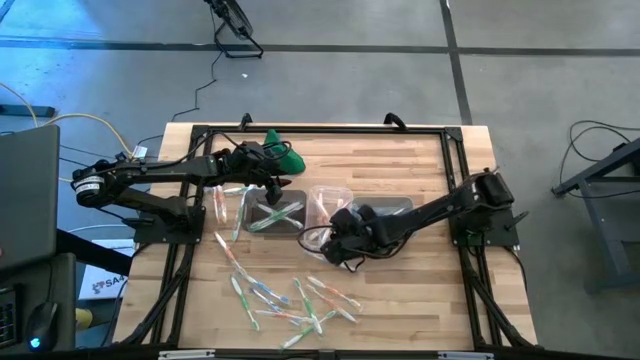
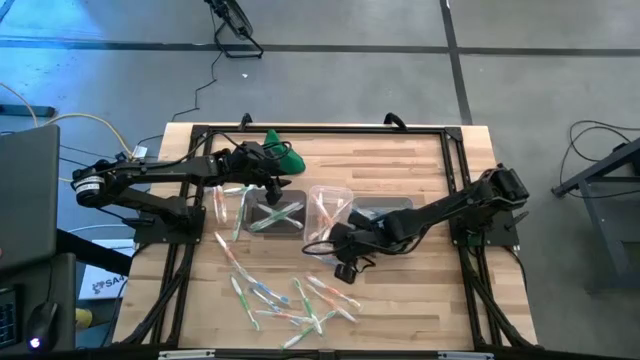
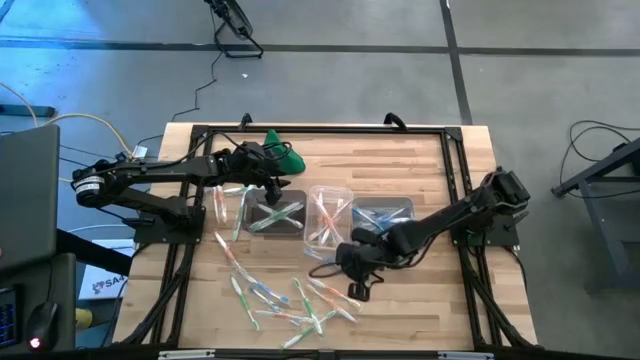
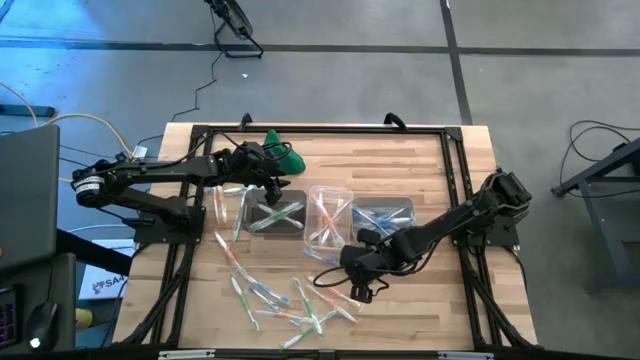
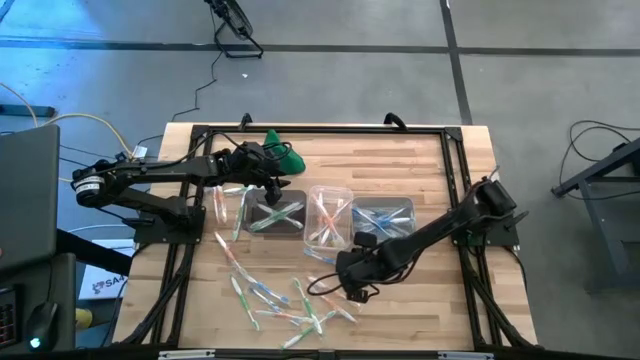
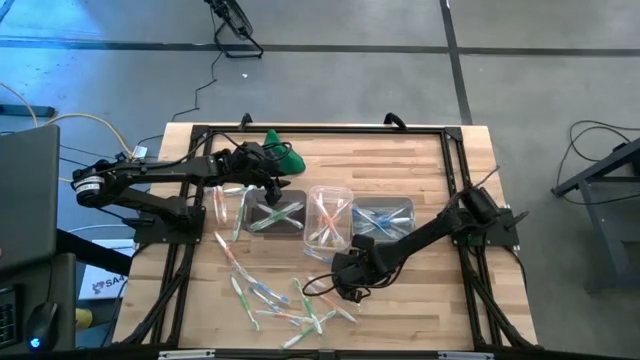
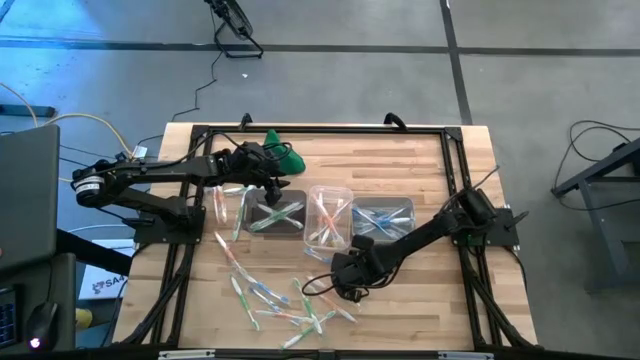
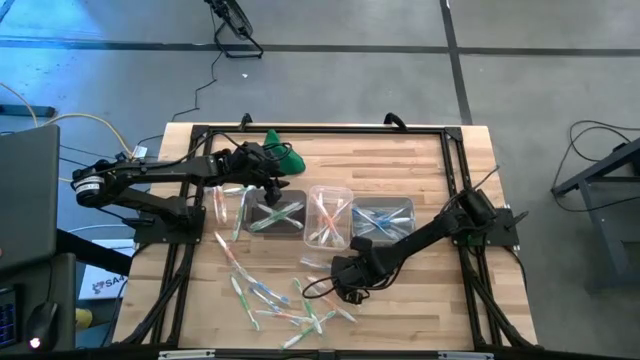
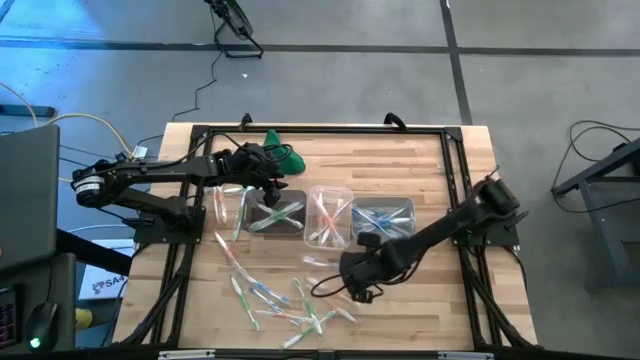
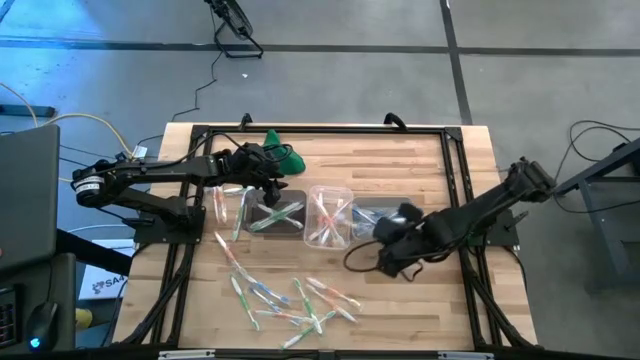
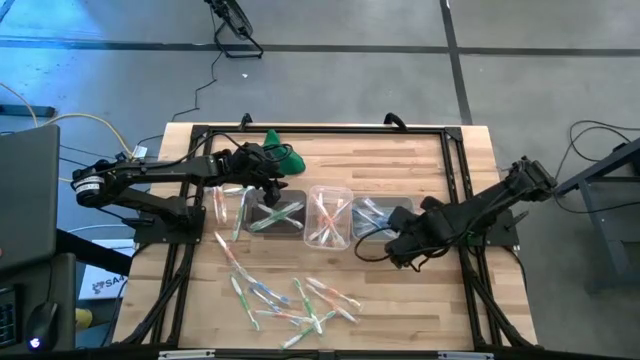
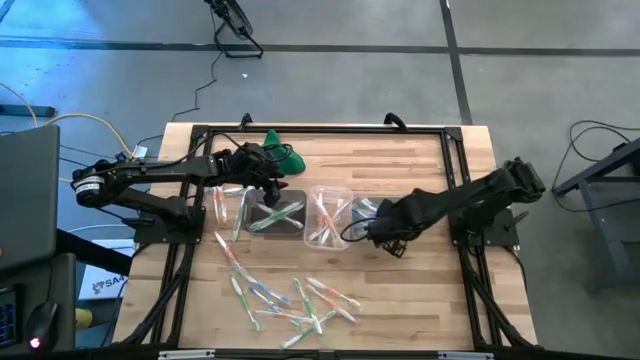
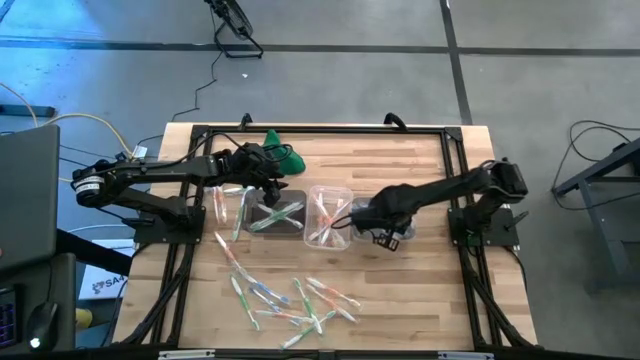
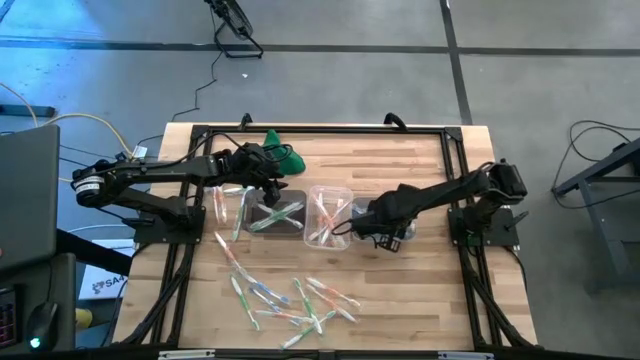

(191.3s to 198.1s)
Task: Pick & Place Toothbrushes
Put the blue toothbrush into the gray bin

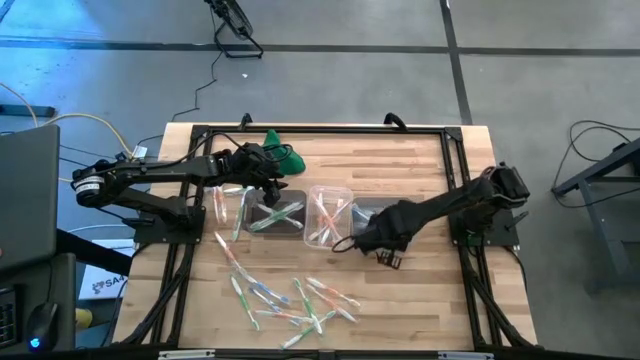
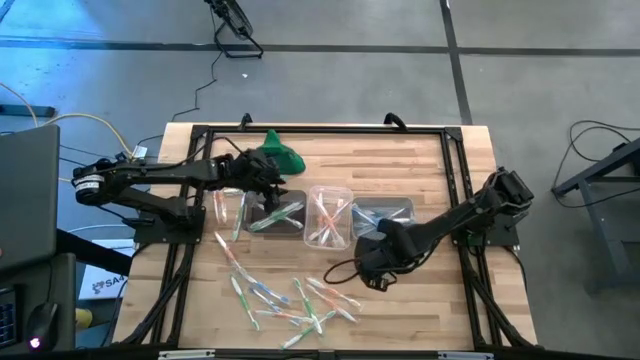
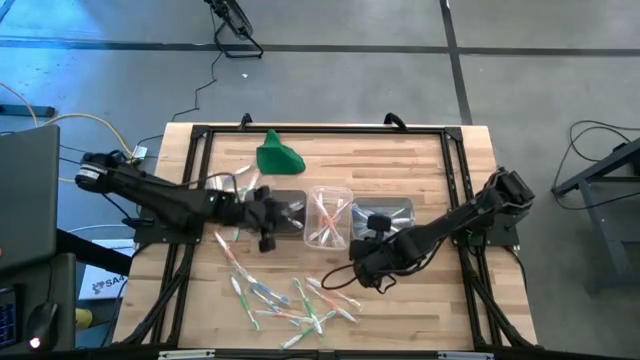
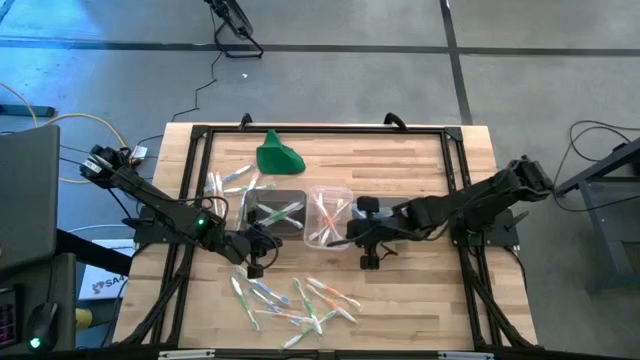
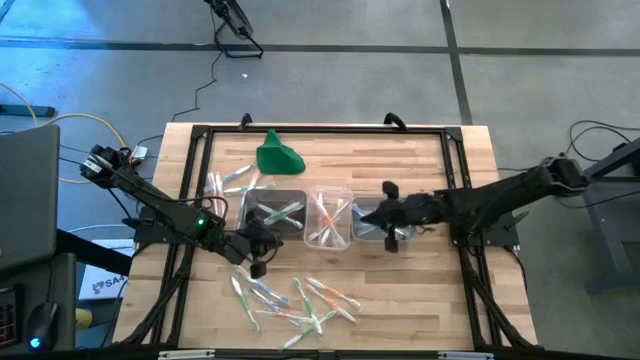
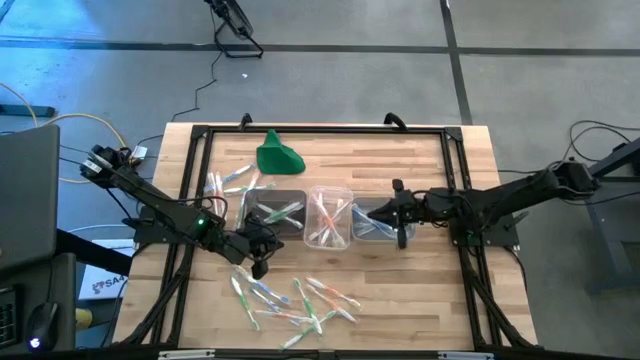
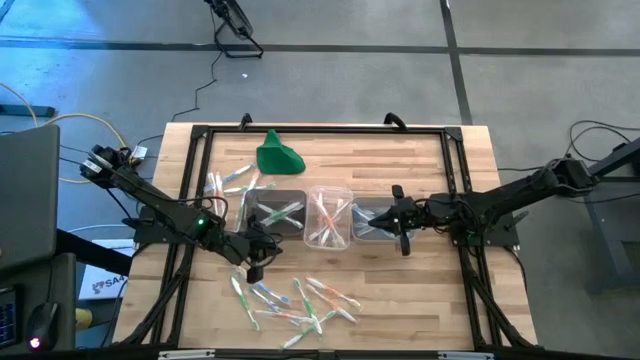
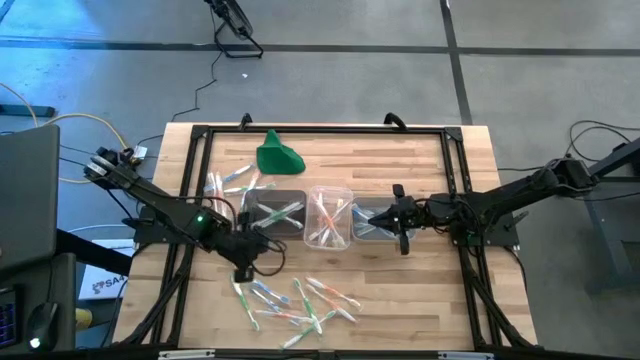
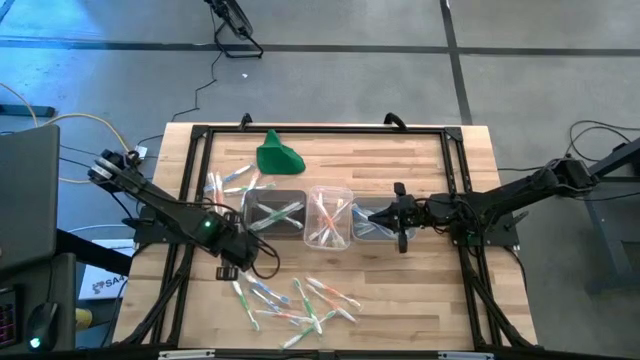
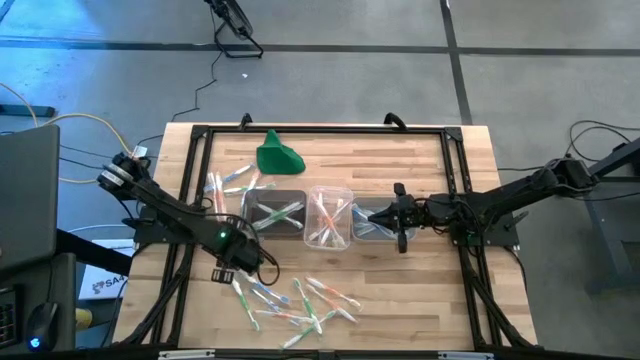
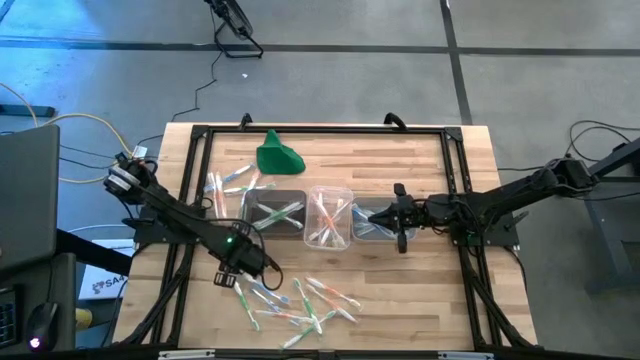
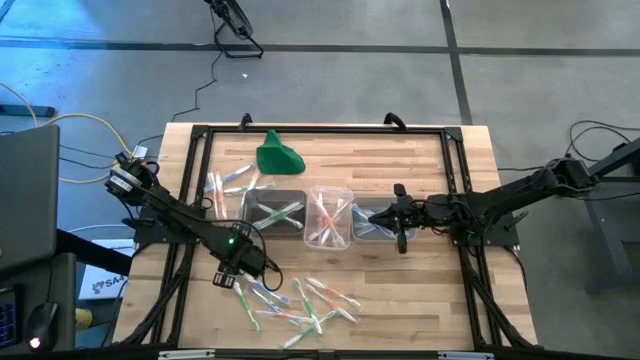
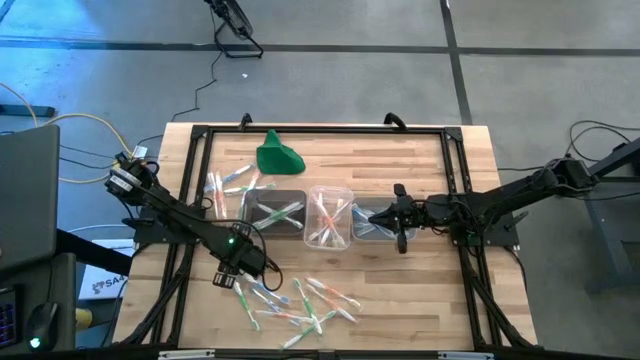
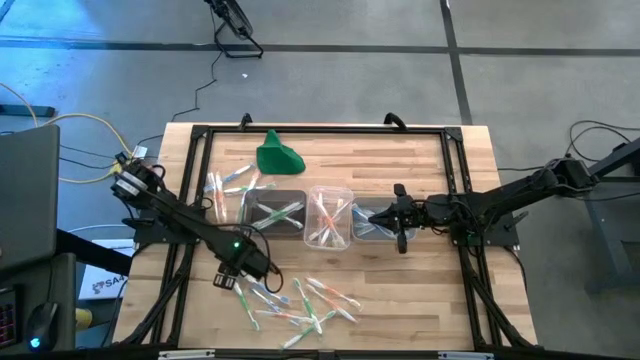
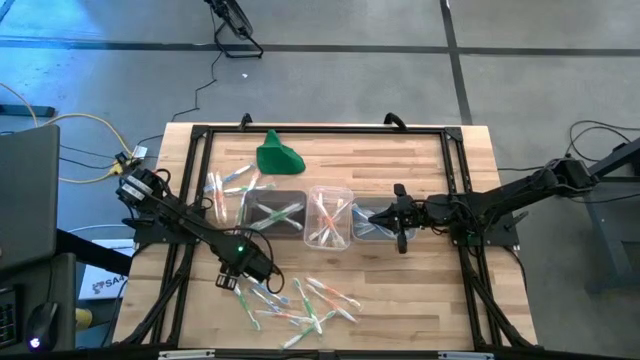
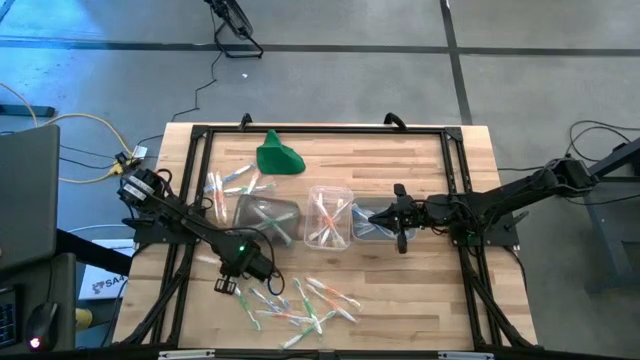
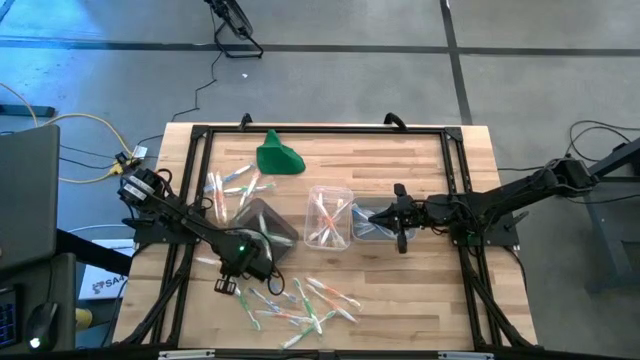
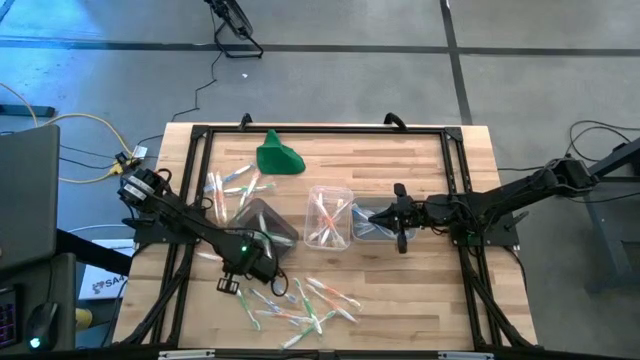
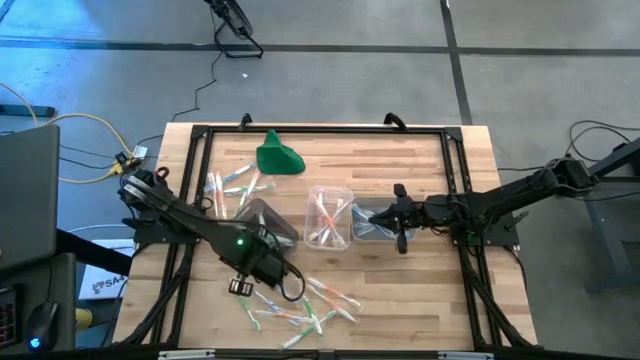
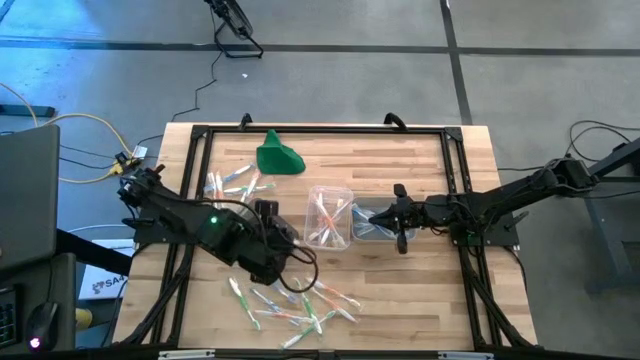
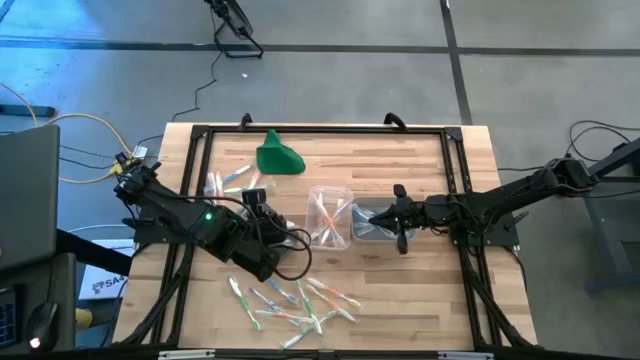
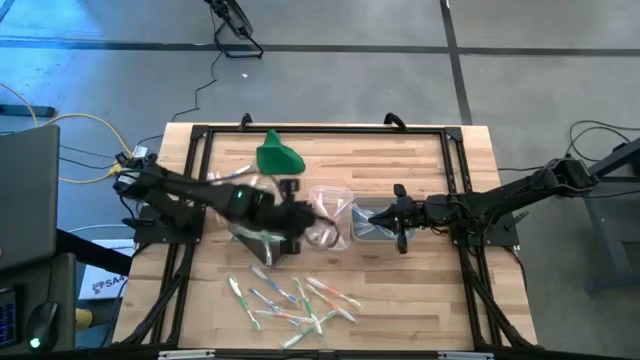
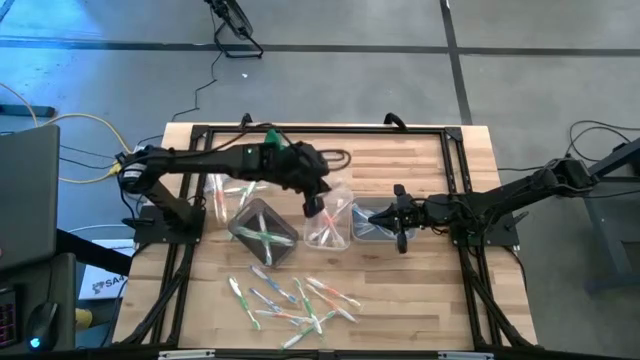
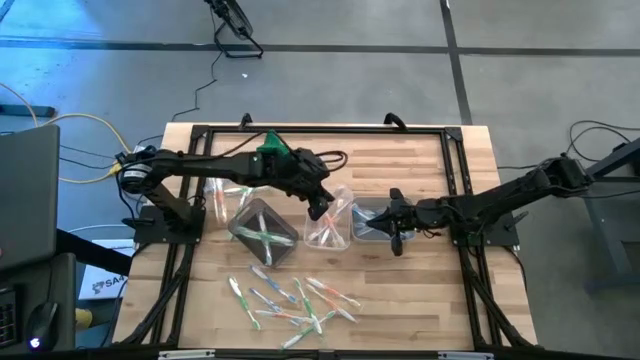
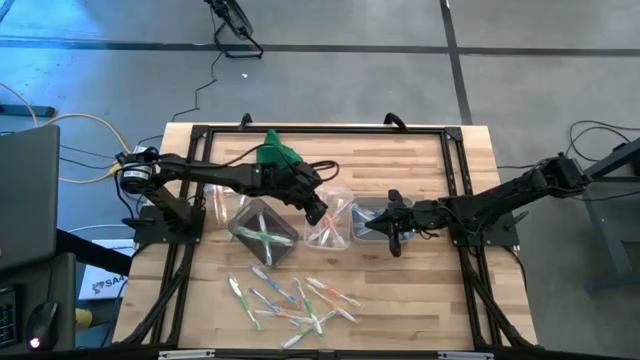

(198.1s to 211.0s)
Put the orange toothbrush into the transparent bin

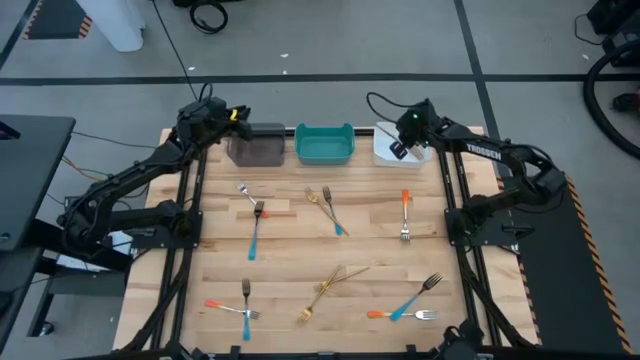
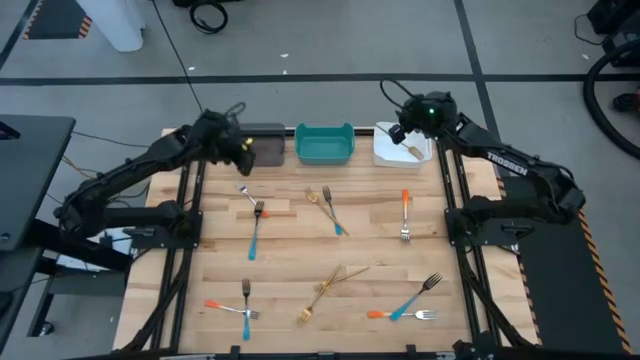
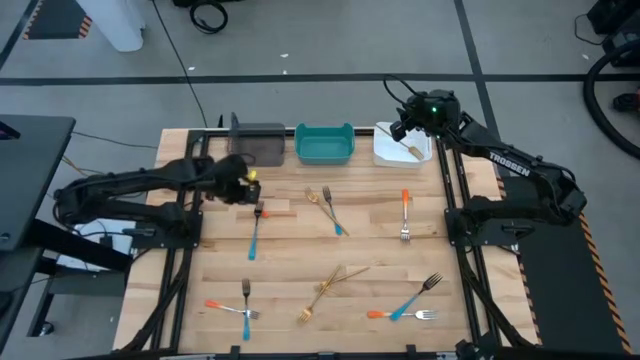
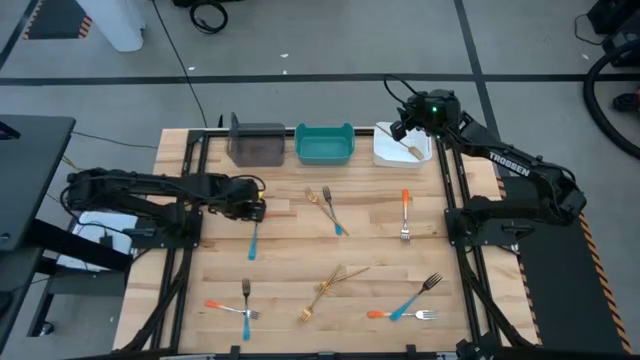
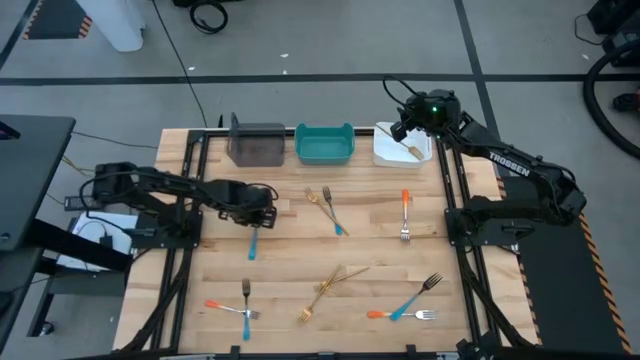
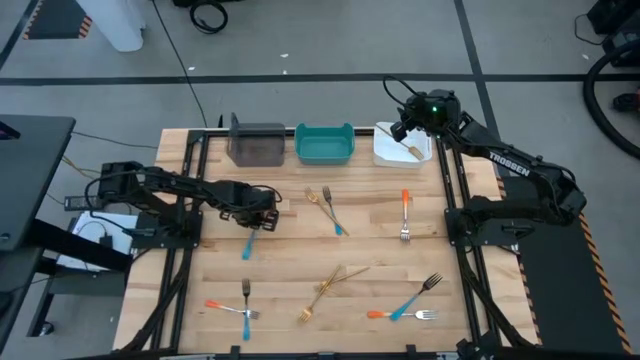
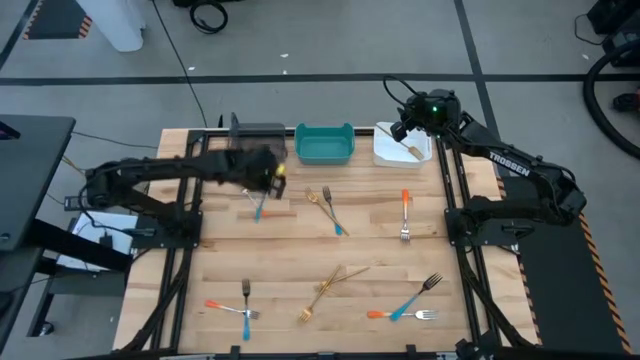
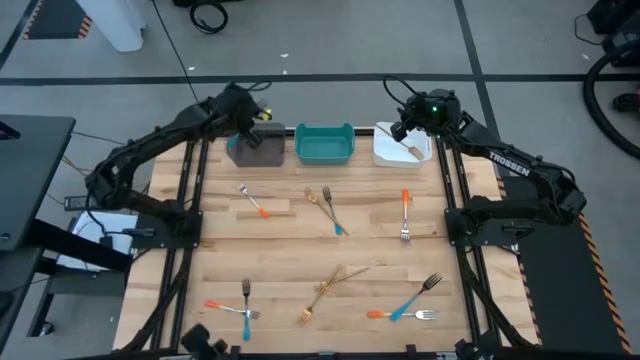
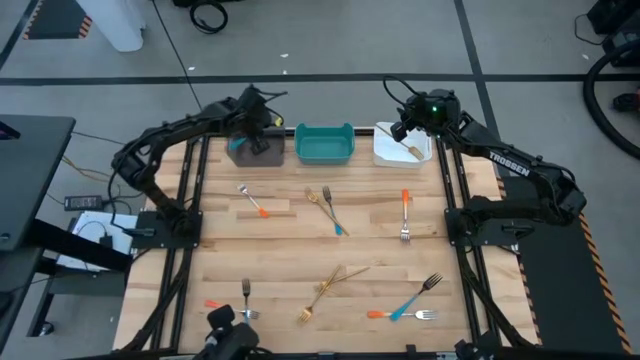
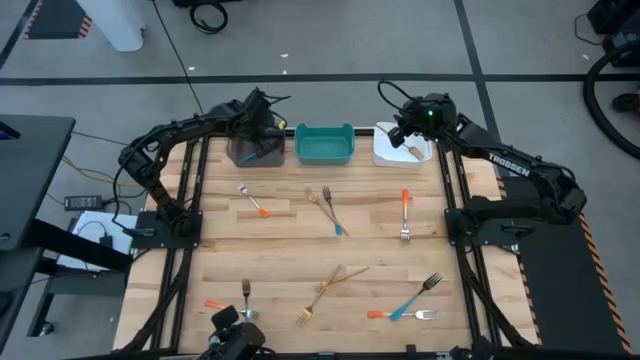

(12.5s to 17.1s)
Task: Sort silverware by color (type)
Put the top left blue fork into the black bin
